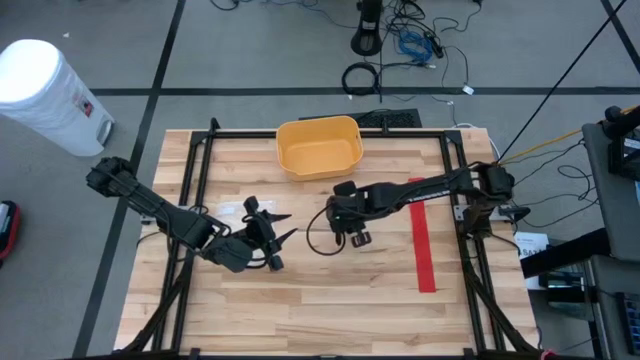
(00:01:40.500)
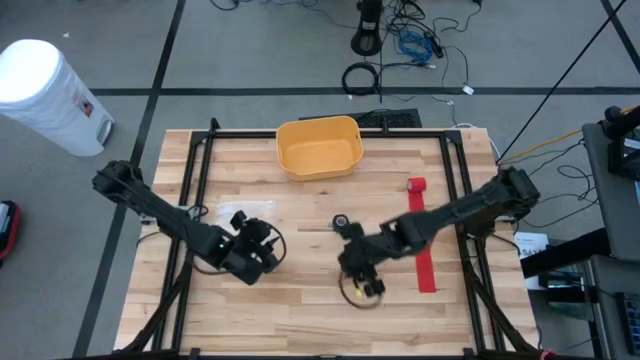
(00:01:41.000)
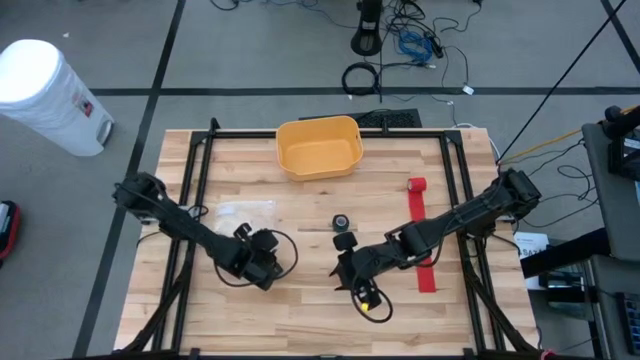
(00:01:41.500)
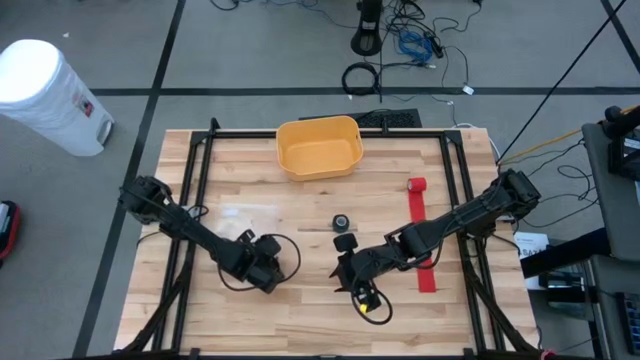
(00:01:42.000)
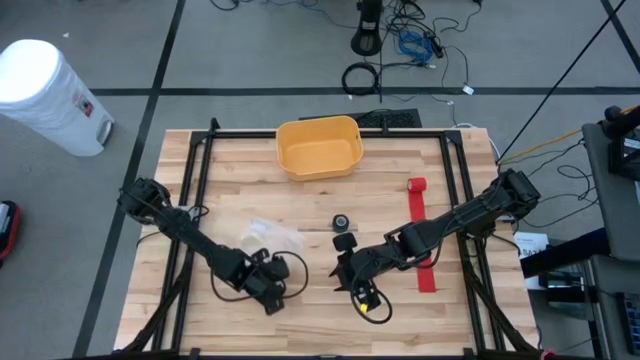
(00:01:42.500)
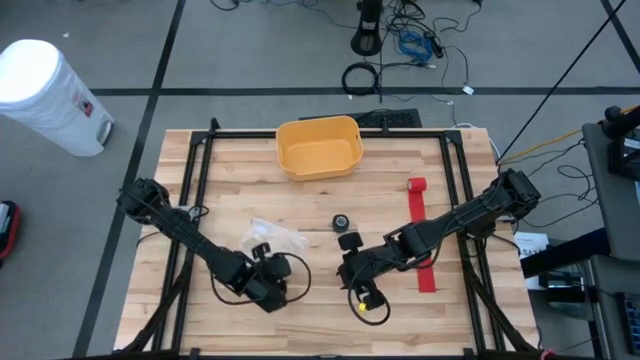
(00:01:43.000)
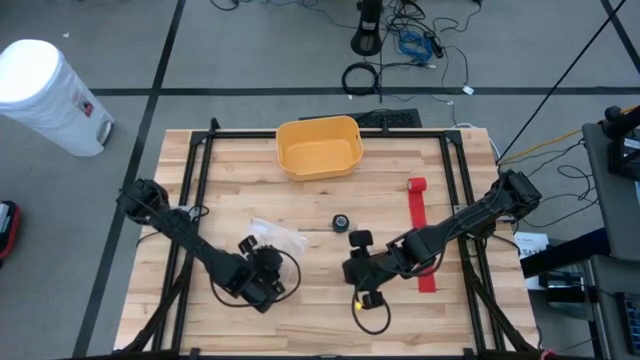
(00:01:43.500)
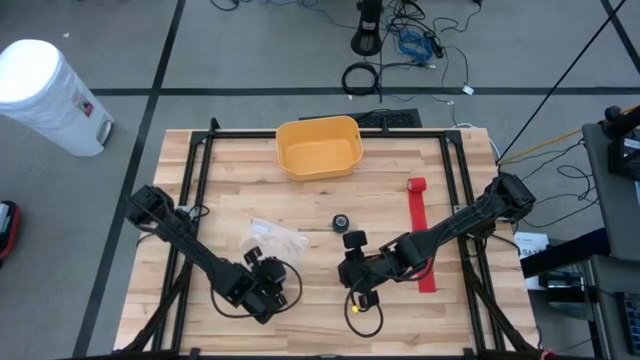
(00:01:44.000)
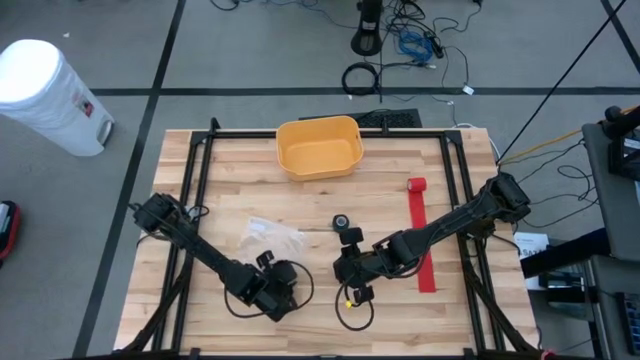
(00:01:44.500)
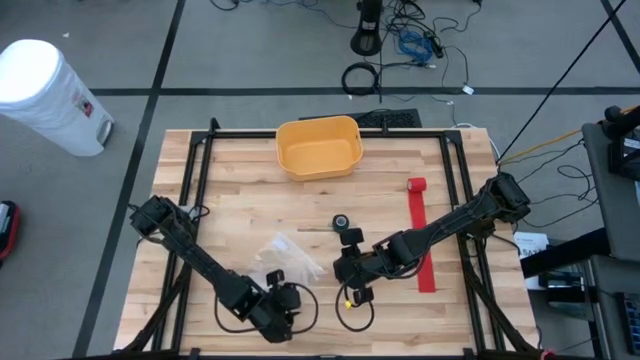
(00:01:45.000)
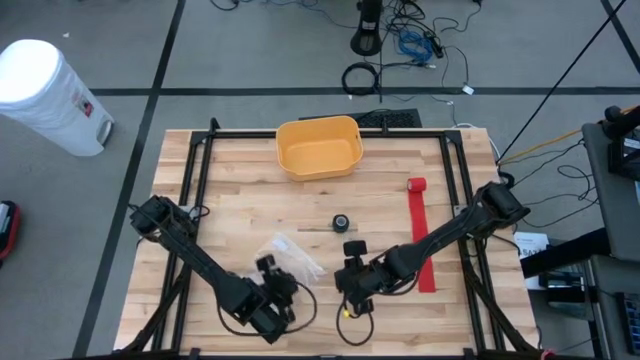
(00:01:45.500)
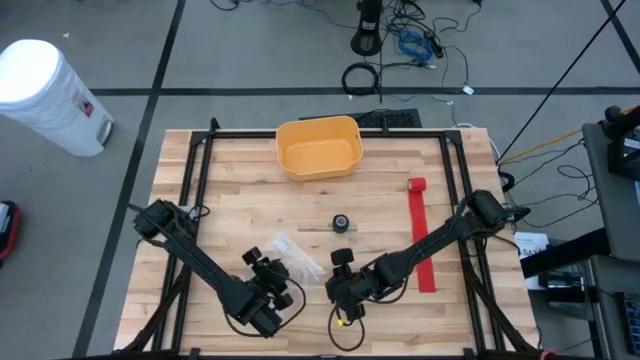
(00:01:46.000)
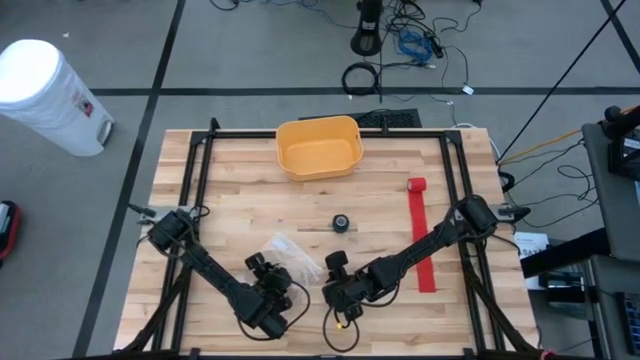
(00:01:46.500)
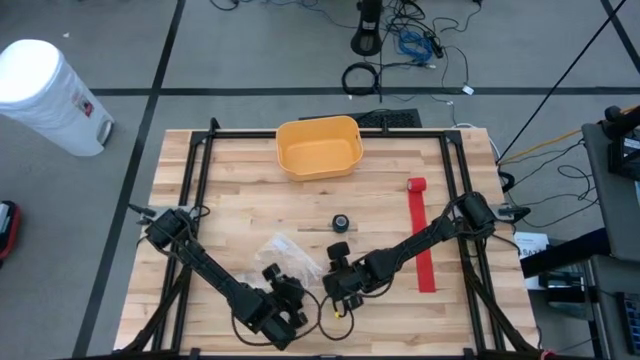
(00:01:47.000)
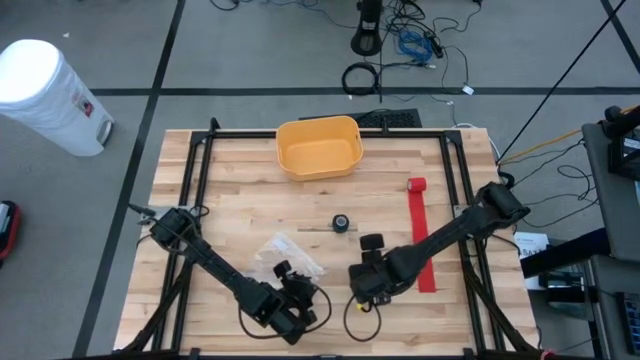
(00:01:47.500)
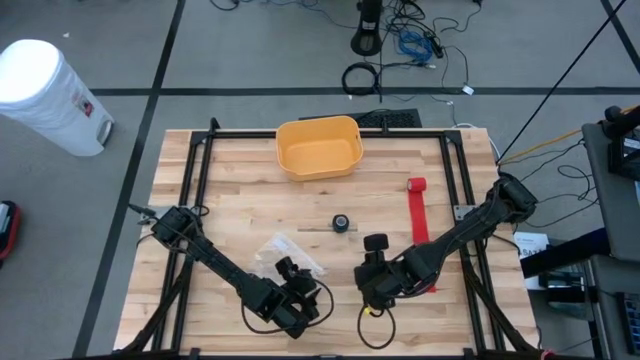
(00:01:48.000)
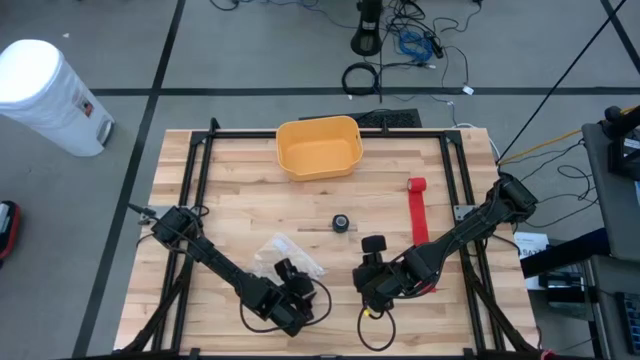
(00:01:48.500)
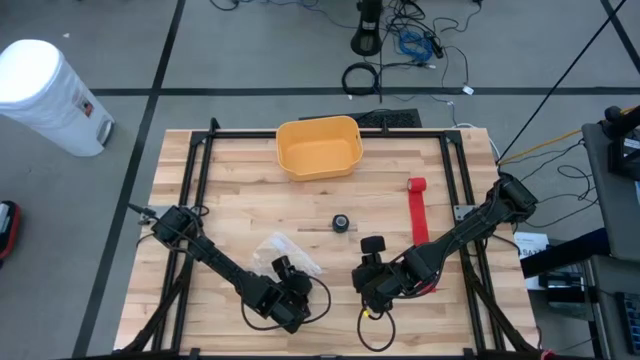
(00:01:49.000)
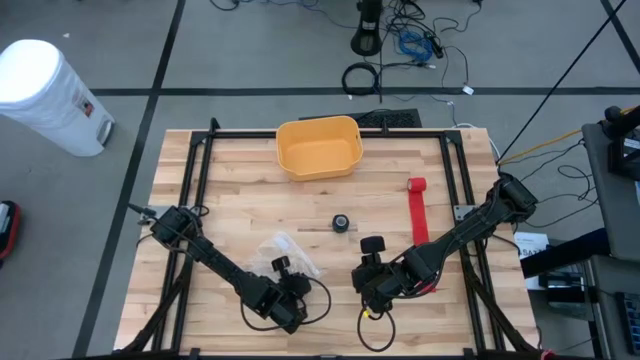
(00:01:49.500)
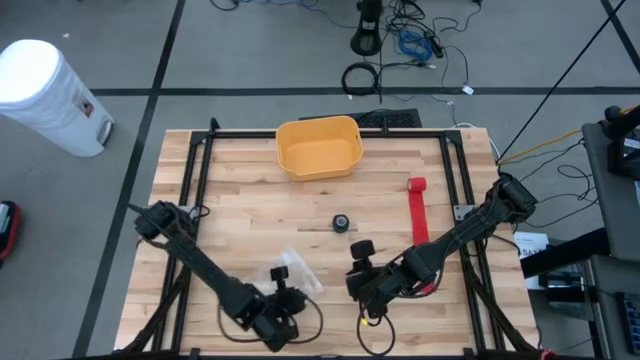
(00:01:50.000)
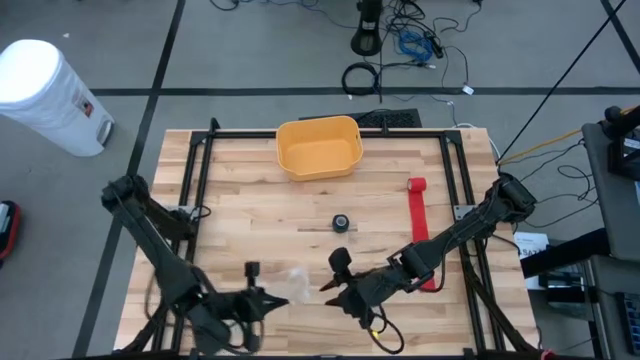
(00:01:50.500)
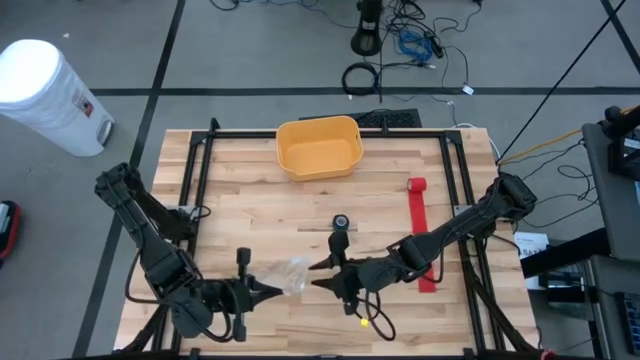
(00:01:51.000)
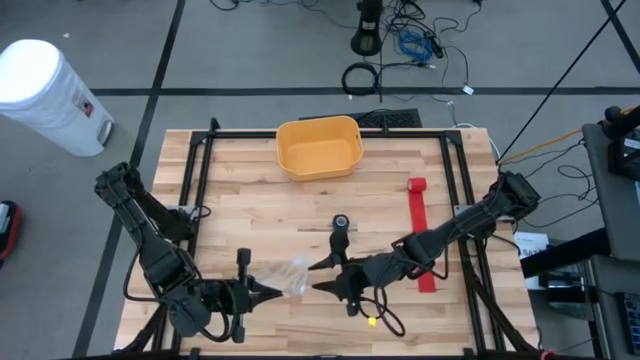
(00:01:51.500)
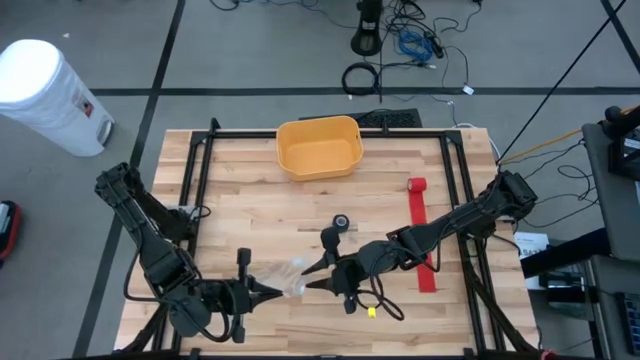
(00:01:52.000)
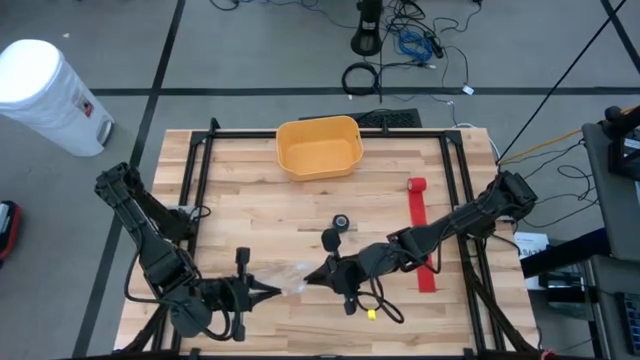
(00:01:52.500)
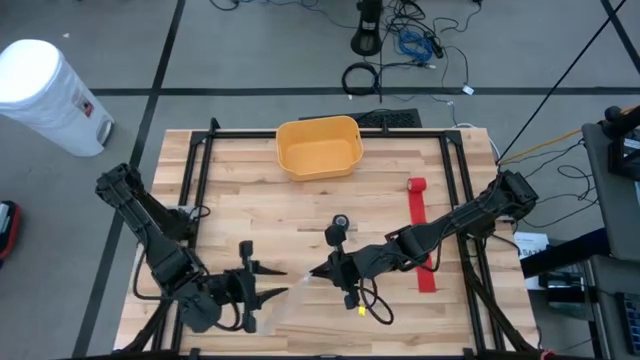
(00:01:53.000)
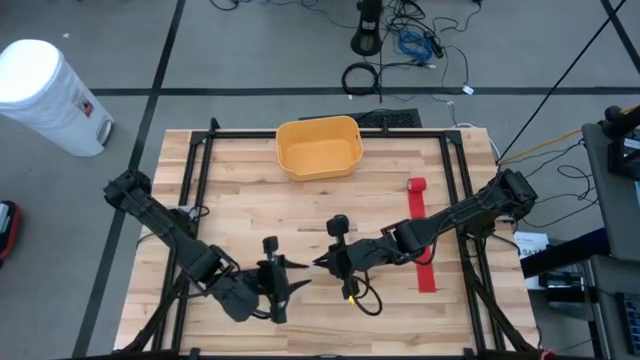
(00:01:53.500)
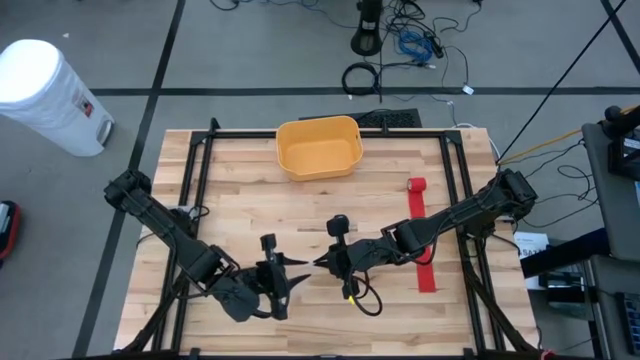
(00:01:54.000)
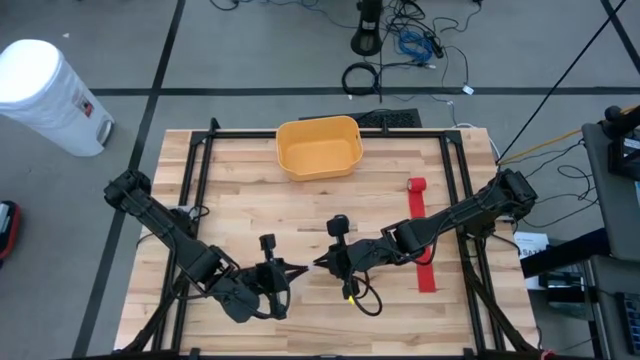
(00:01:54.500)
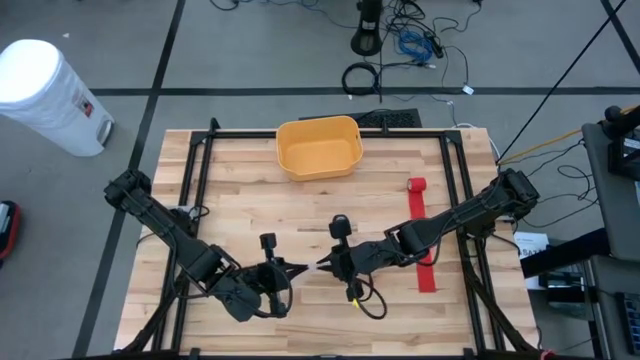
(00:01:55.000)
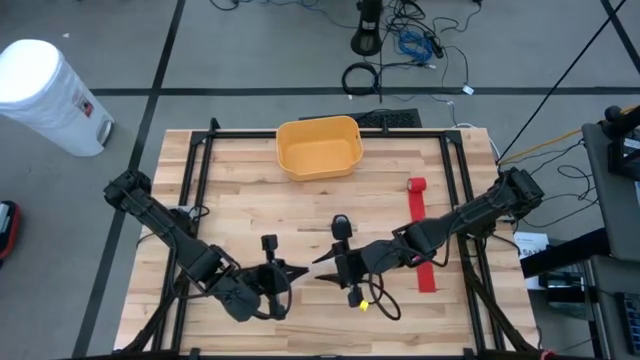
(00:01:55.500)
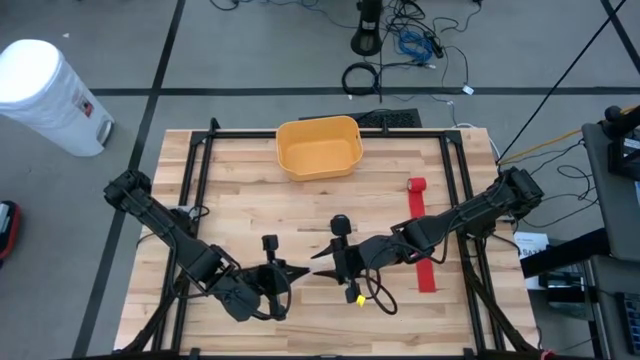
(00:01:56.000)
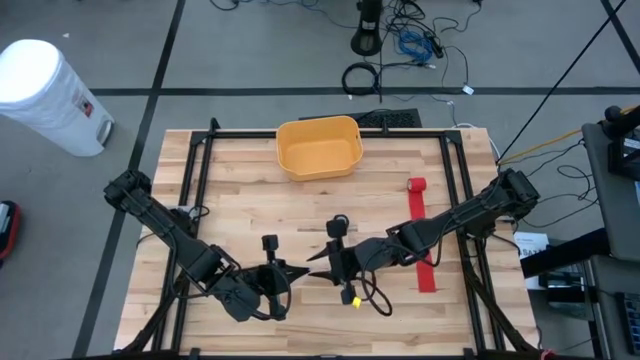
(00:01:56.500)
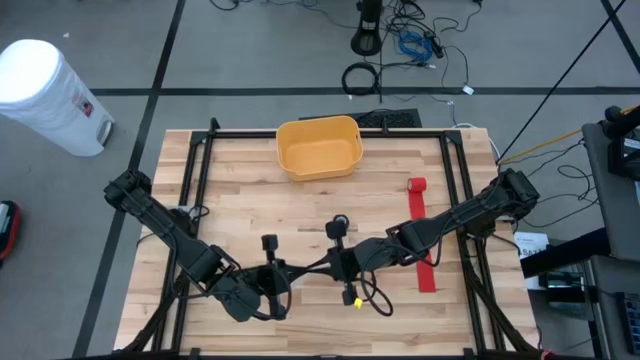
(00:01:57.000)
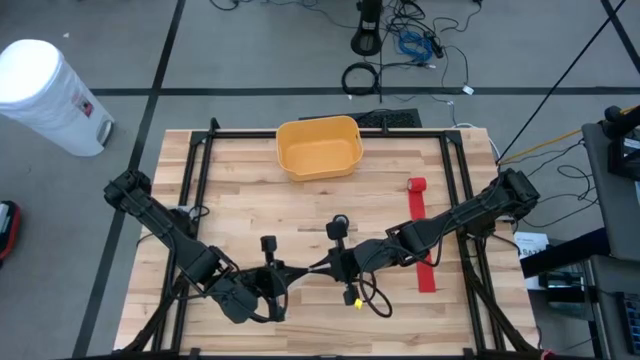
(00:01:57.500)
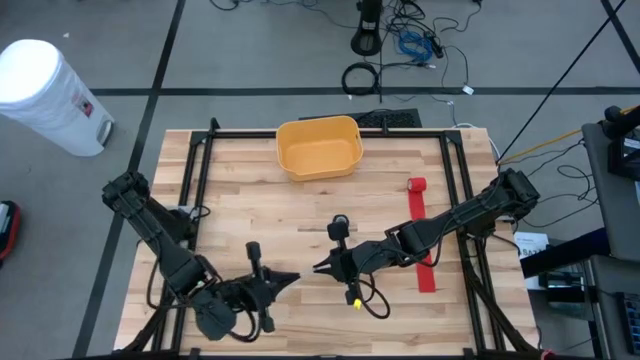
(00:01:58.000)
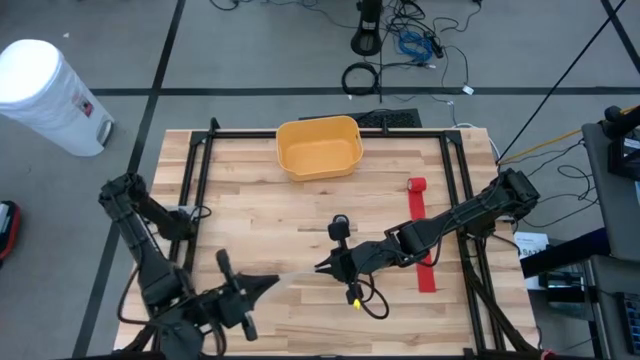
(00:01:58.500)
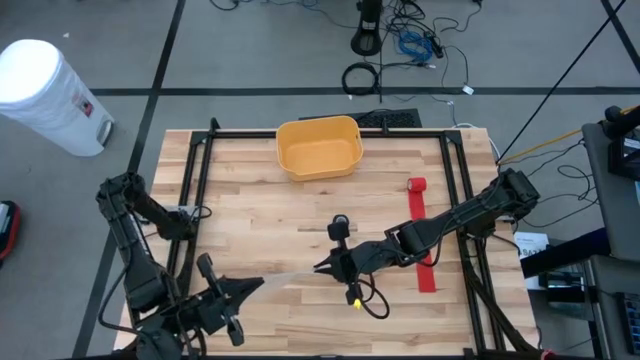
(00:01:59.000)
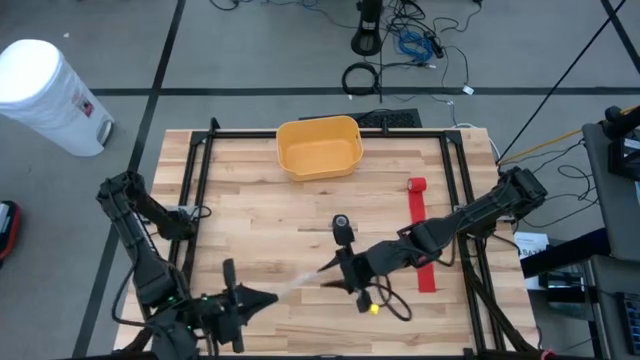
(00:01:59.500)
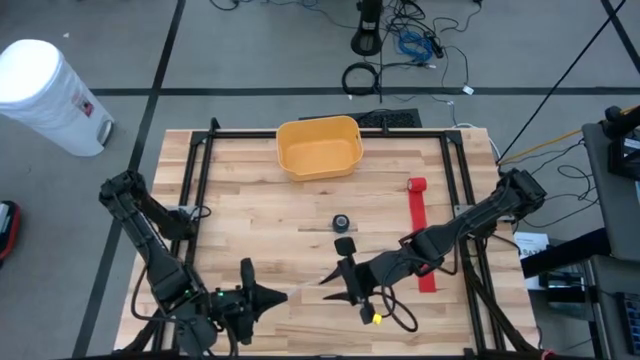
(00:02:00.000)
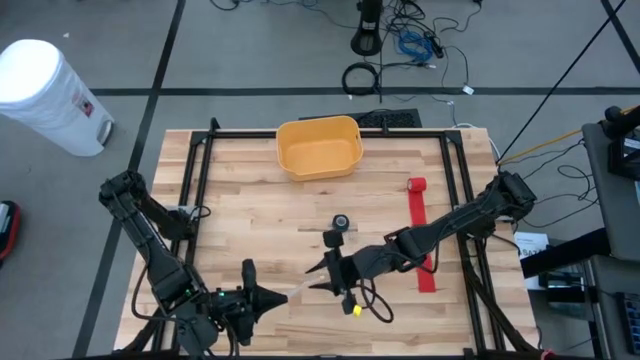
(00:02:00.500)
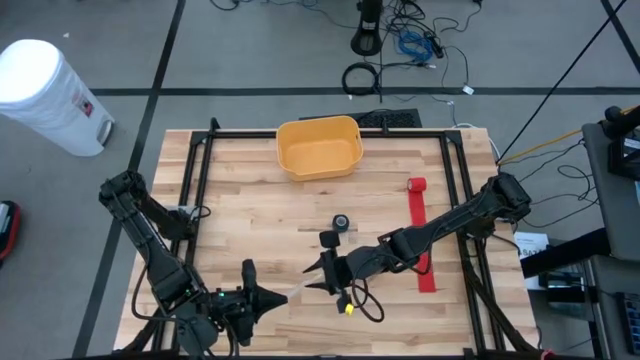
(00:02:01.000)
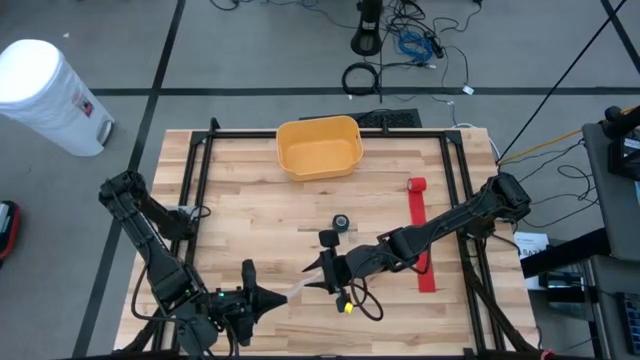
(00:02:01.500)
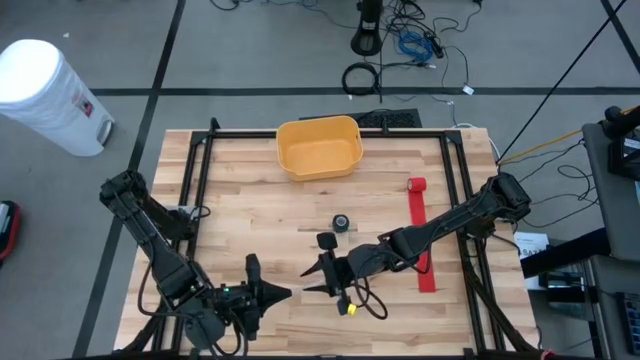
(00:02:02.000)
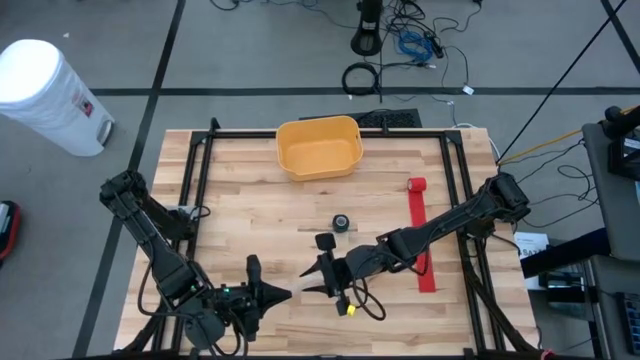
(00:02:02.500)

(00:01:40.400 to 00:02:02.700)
Task: Roll bandage
Open the transparent zip bag
